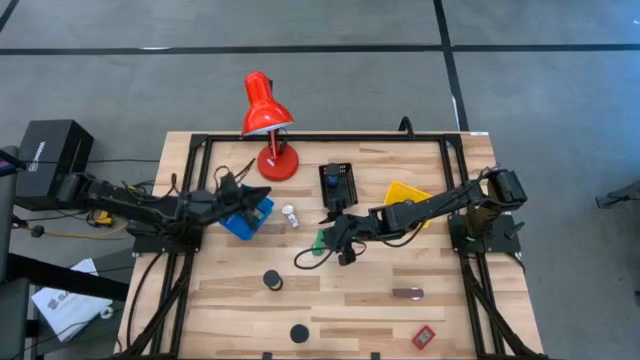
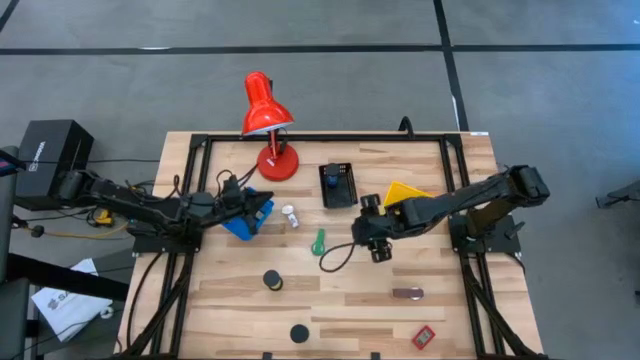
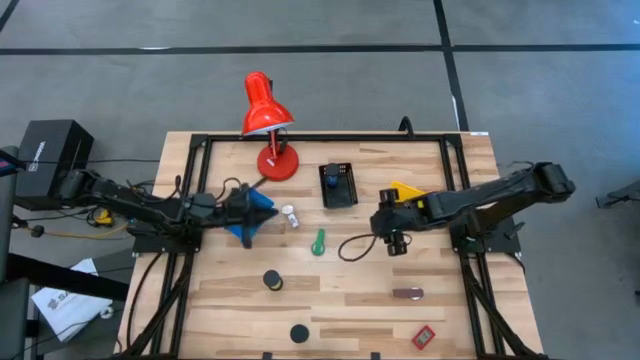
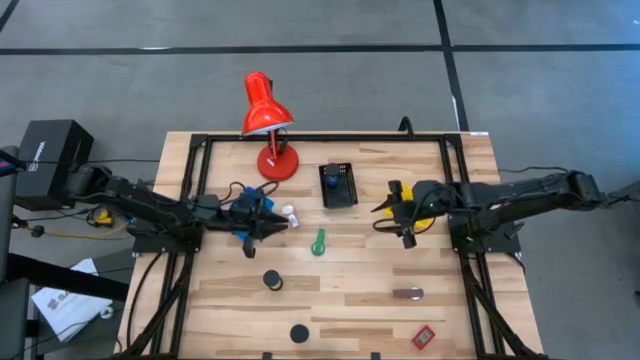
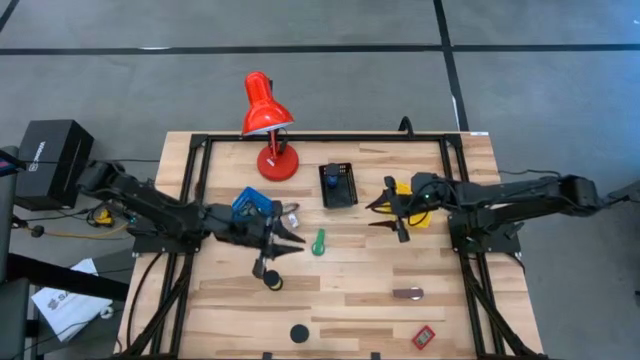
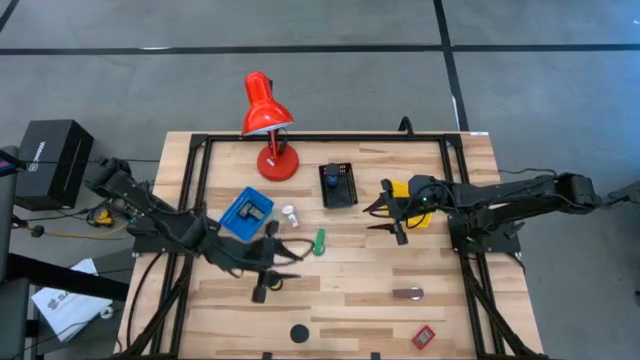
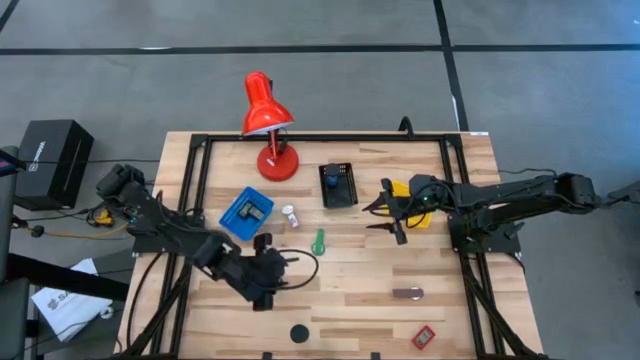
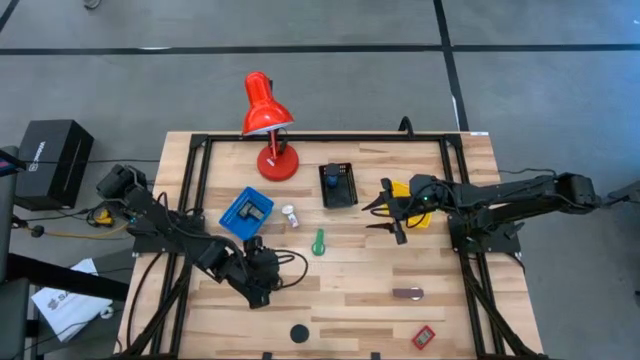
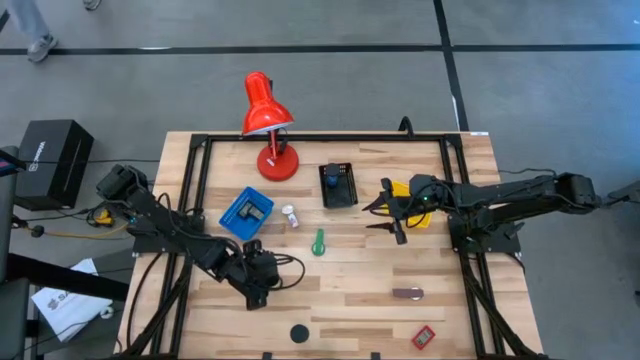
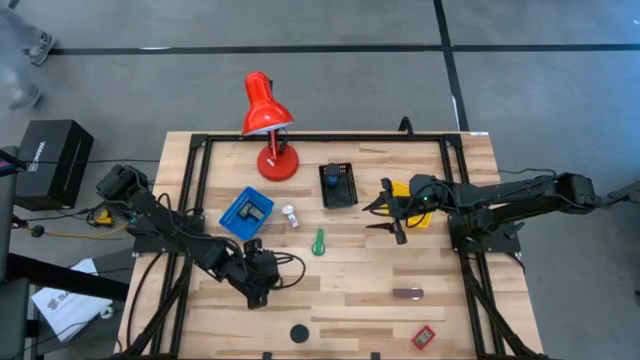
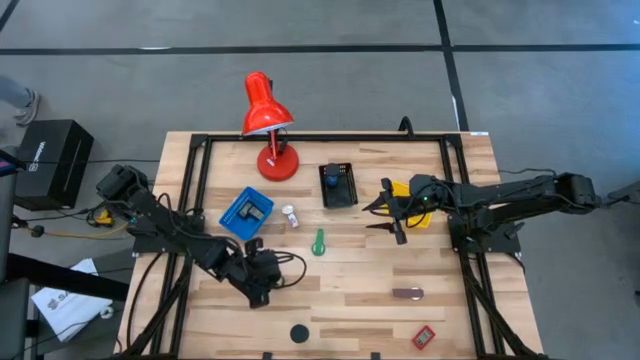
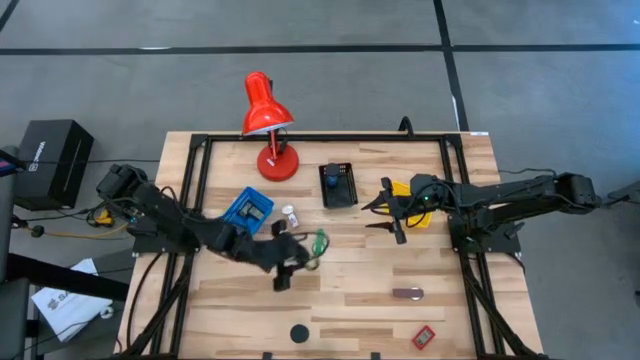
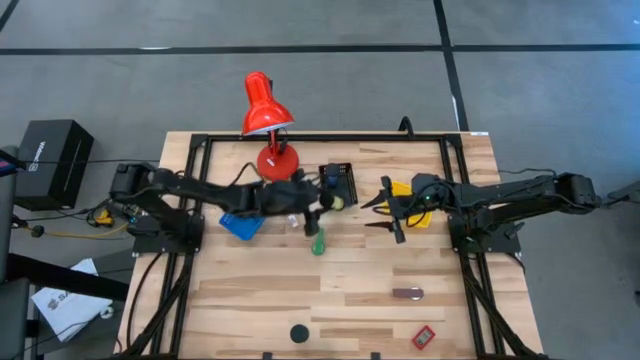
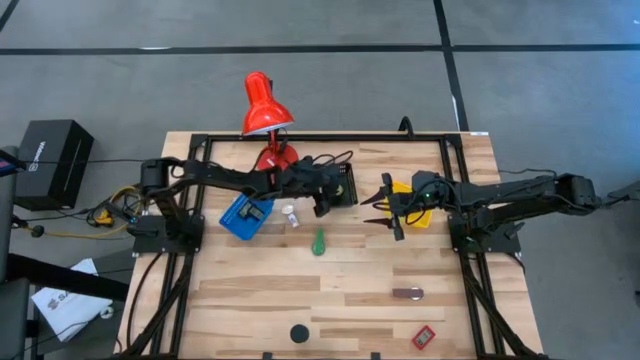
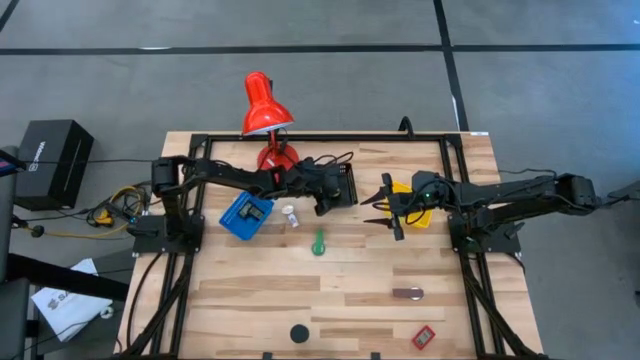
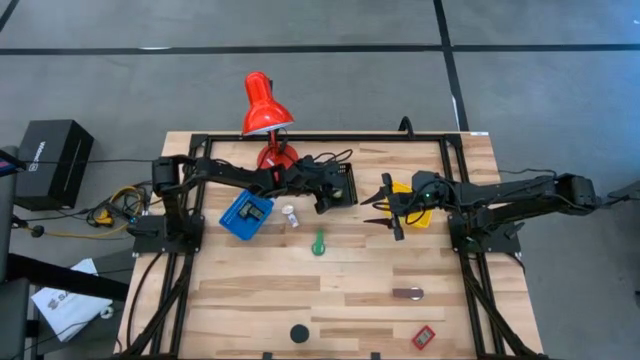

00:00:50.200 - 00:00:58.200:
Task: Pick & Place Office items
Put the top yellow hourglass into the black basket

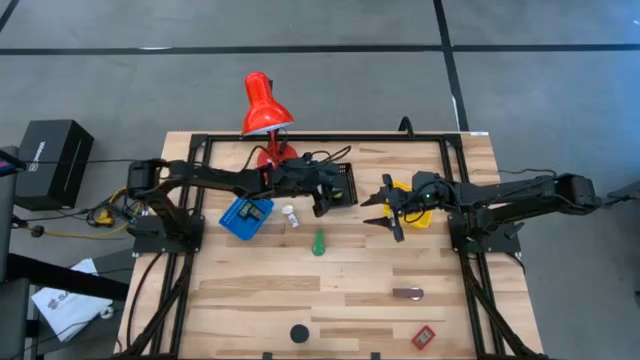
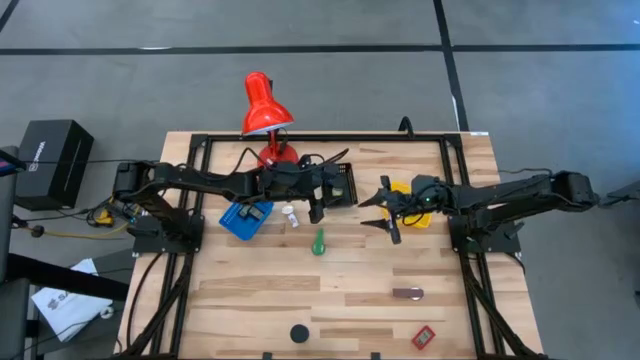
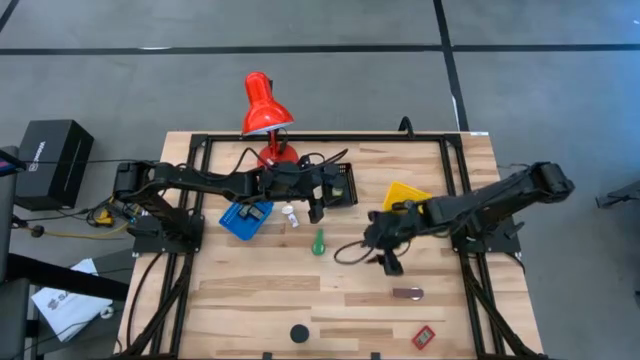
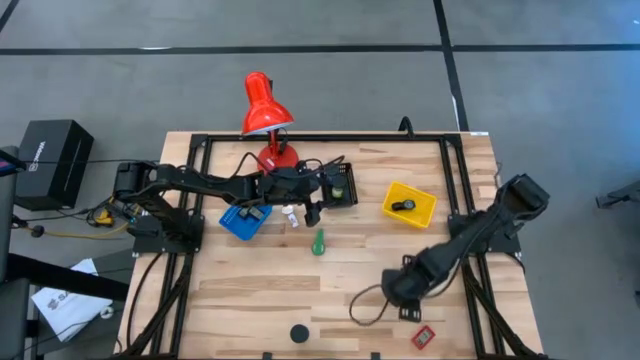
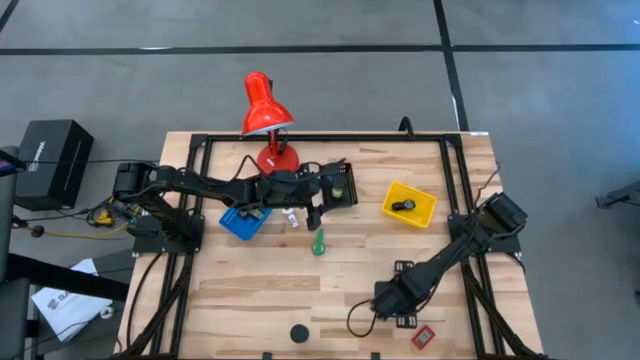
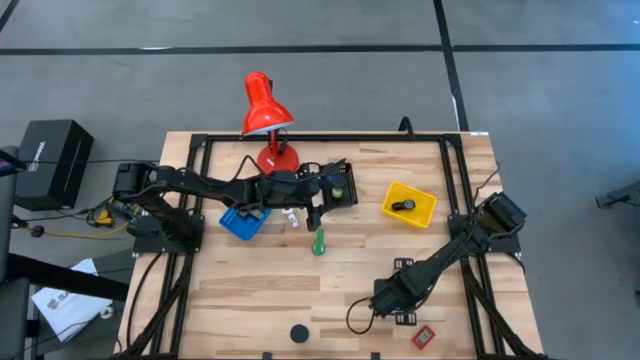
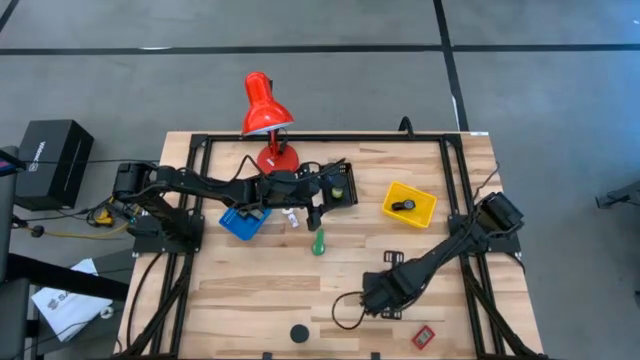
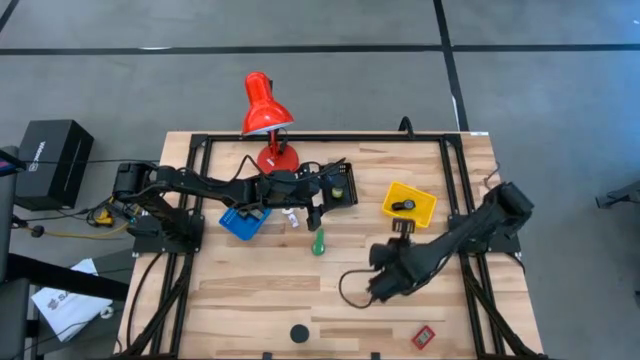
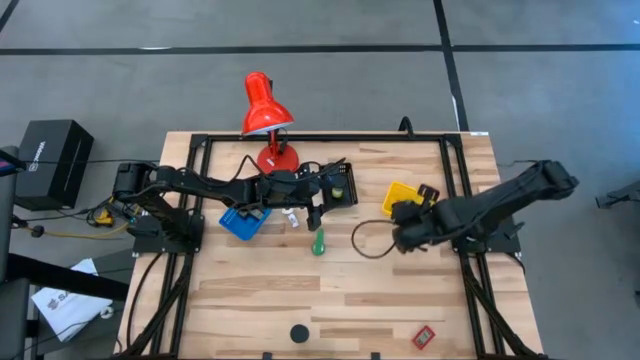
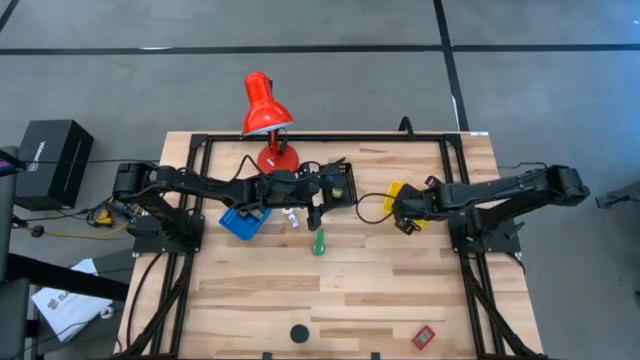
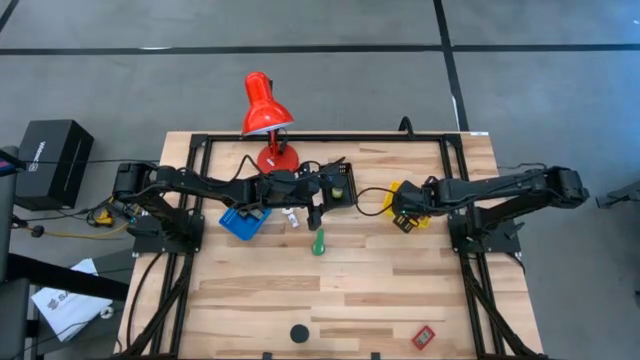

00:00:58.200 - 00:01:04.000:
Put the brown watch into the yellow basket

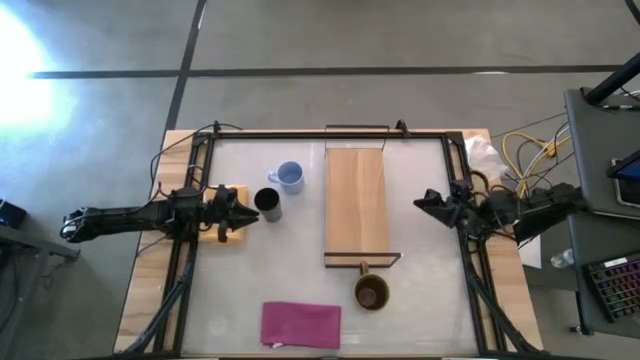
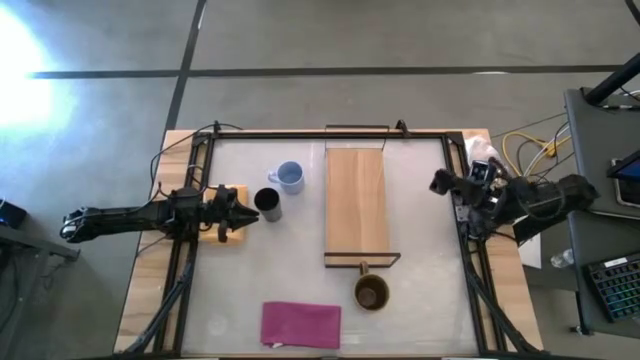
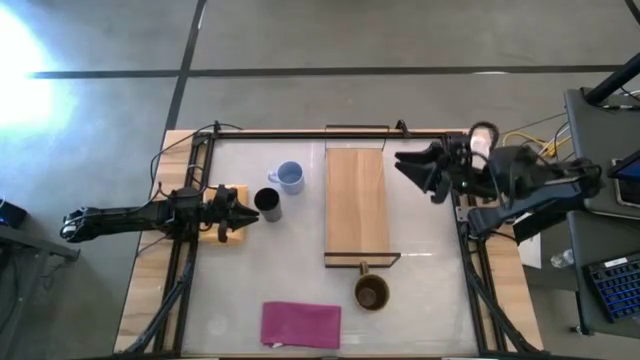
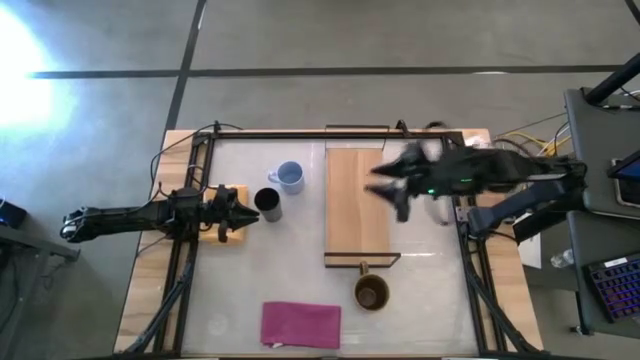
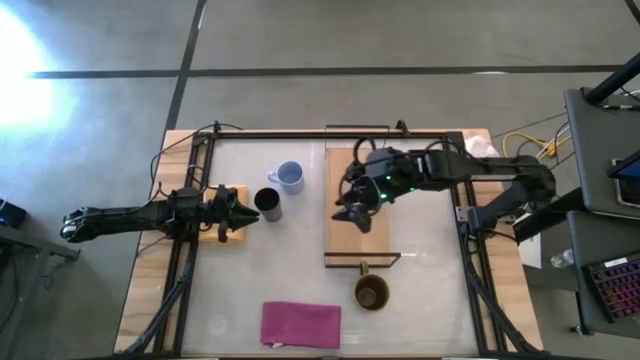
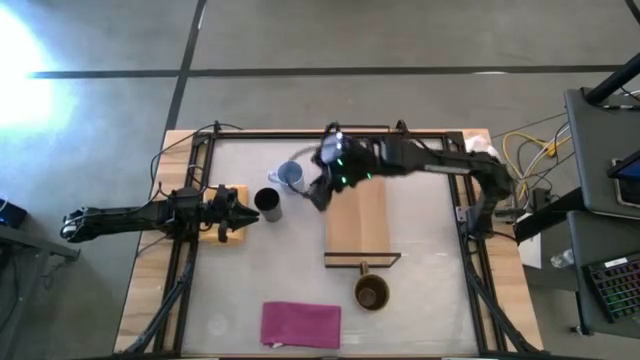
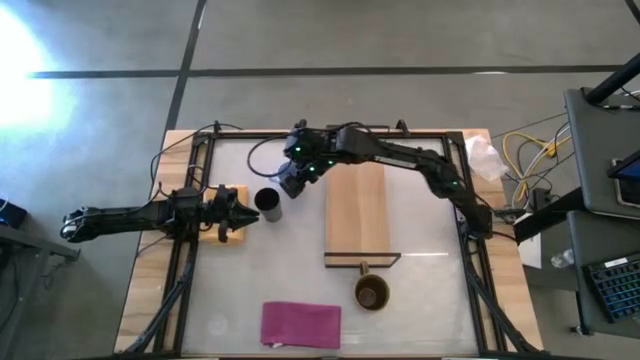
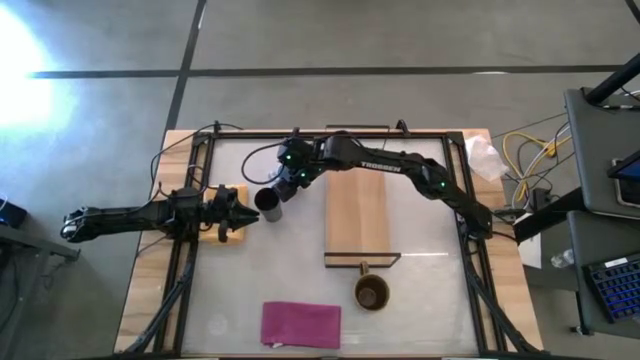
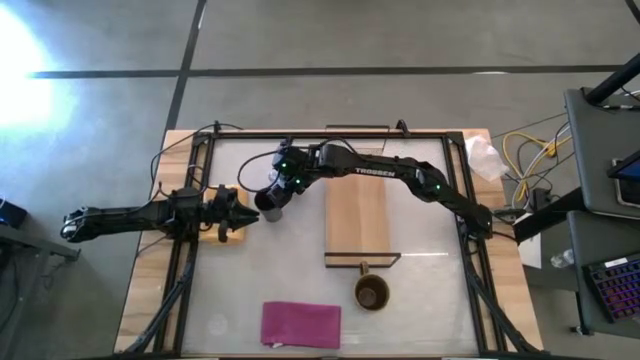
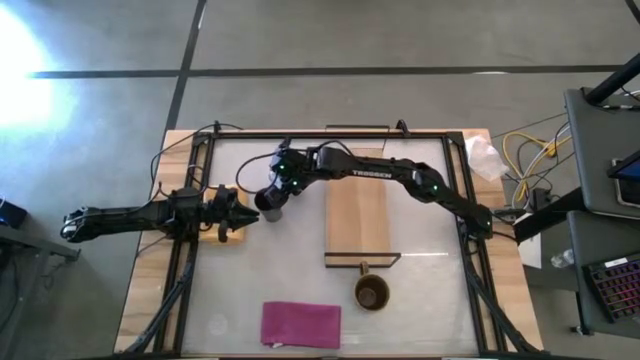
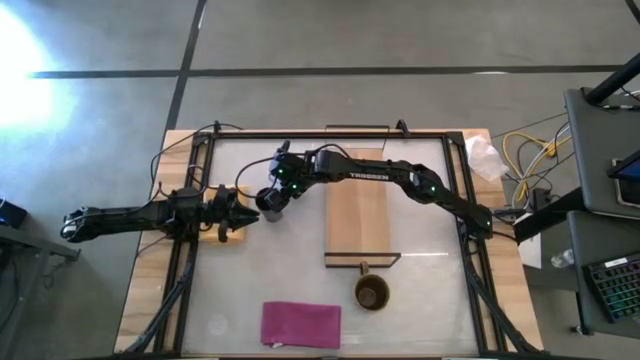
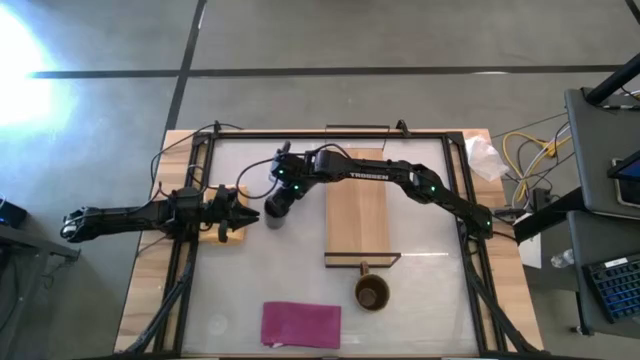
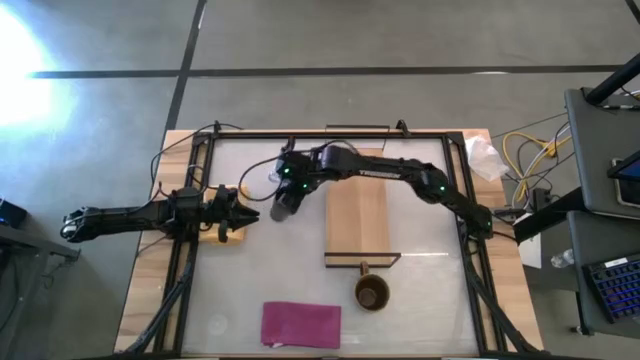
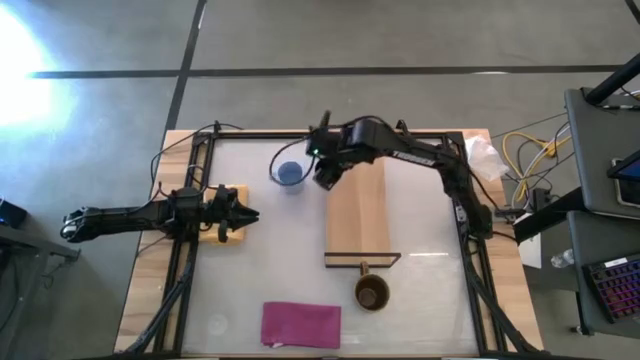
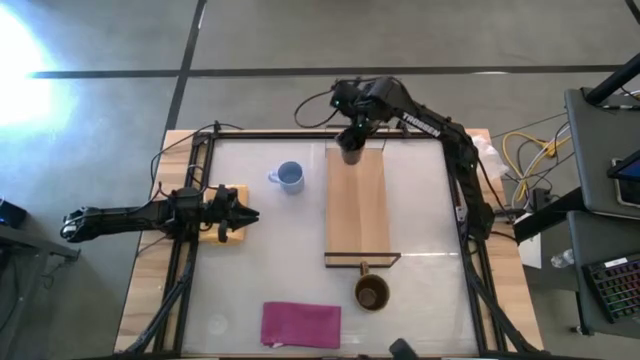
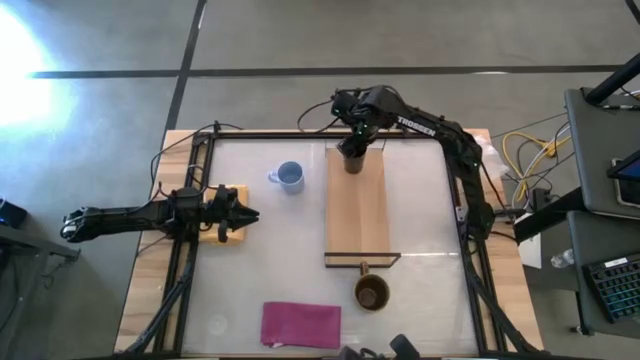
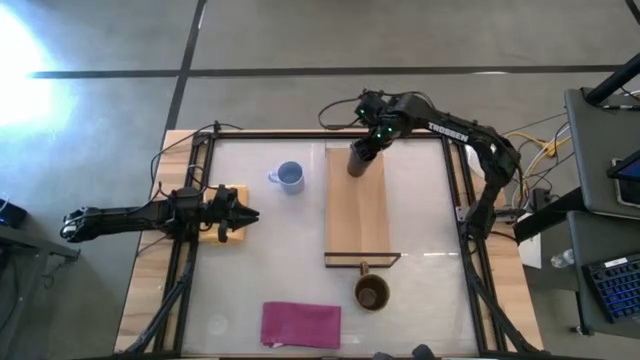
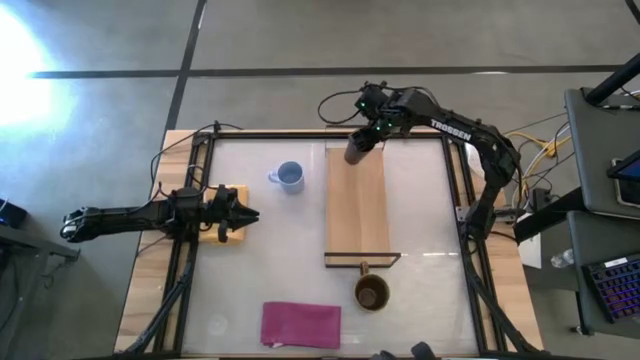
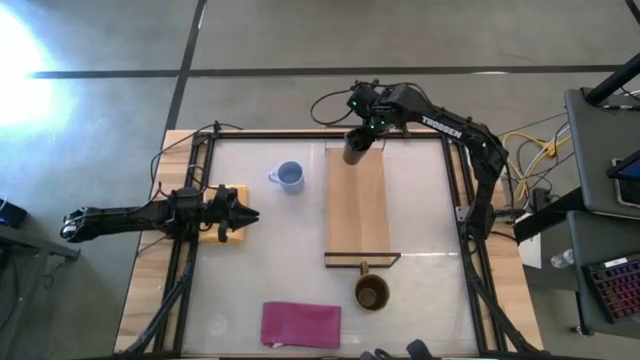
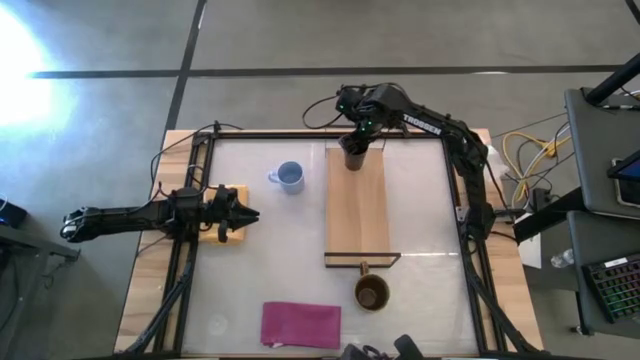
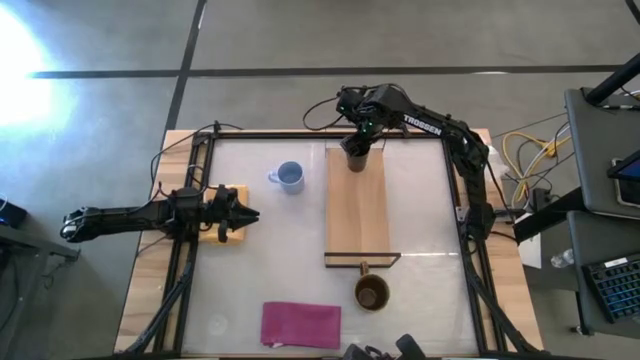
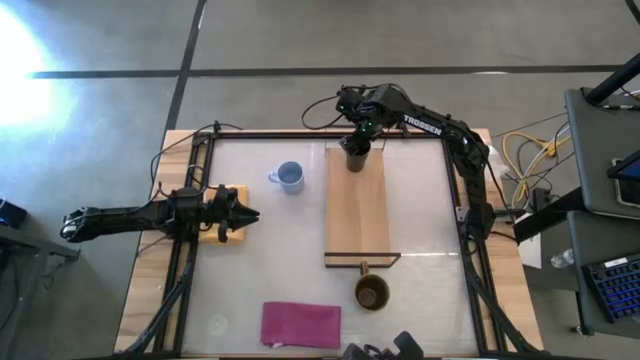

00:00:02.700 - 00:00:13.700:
Task: Stack small to large cups/mugs on shelf
Put the black cup on the shelf
